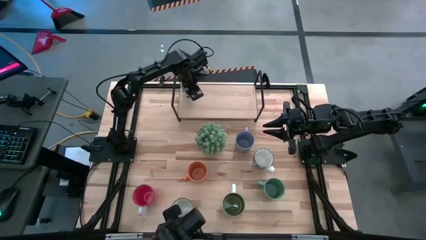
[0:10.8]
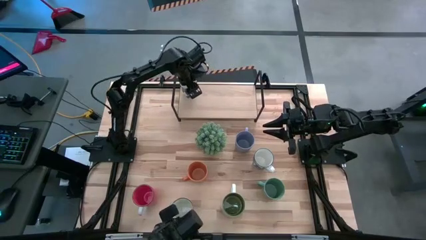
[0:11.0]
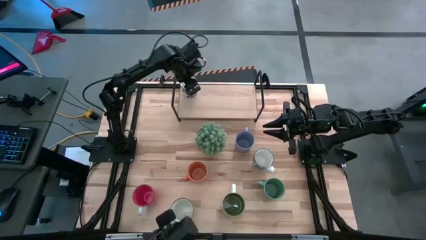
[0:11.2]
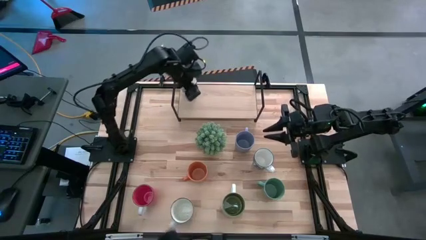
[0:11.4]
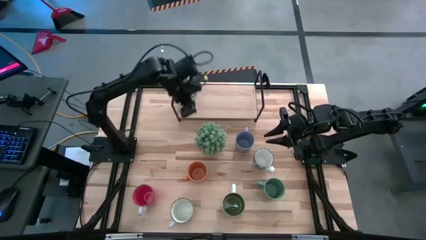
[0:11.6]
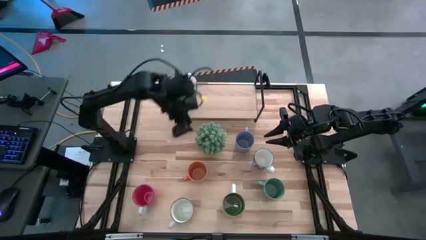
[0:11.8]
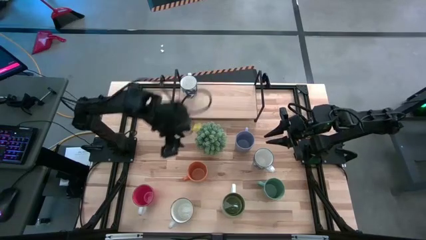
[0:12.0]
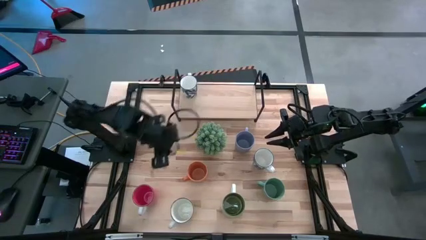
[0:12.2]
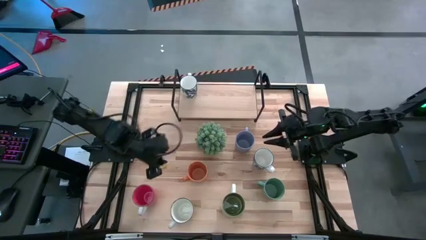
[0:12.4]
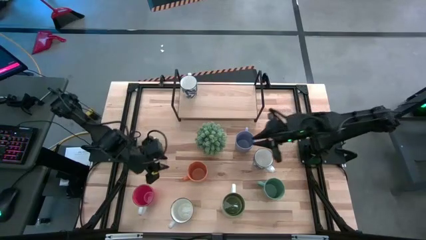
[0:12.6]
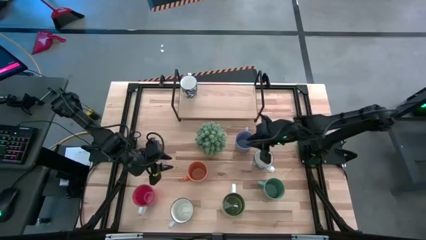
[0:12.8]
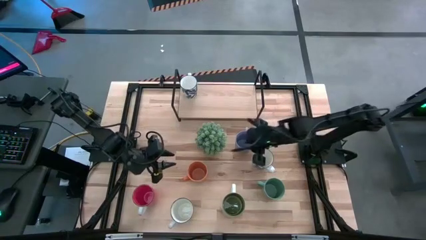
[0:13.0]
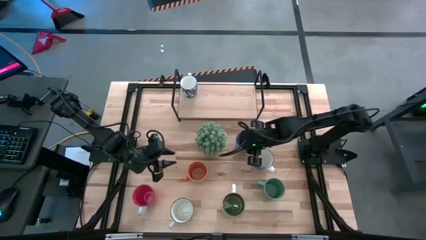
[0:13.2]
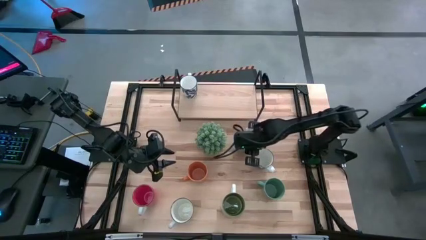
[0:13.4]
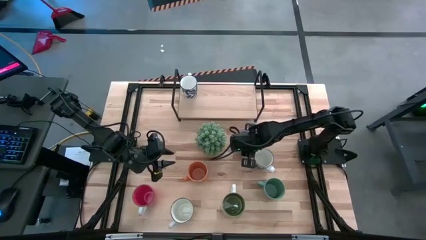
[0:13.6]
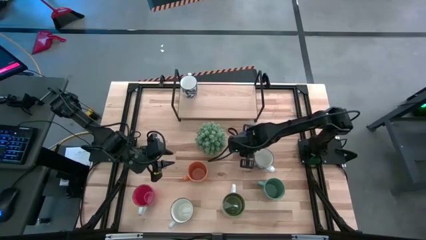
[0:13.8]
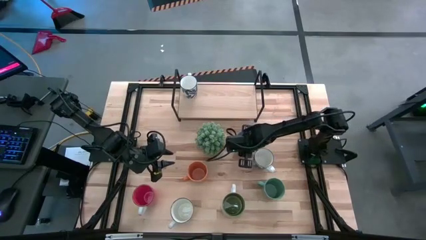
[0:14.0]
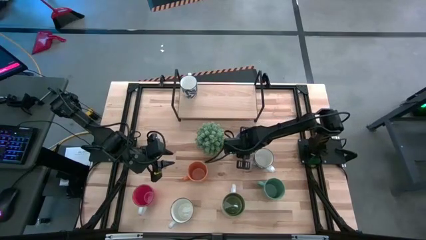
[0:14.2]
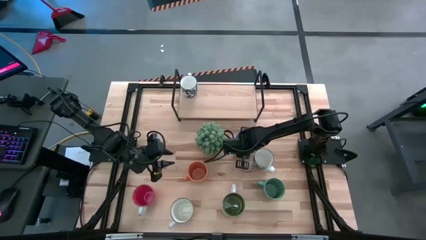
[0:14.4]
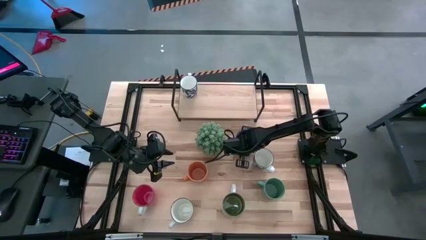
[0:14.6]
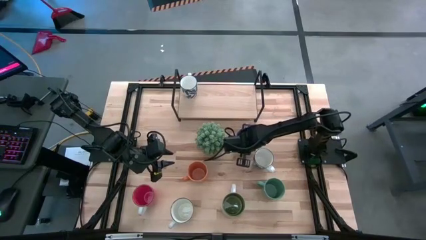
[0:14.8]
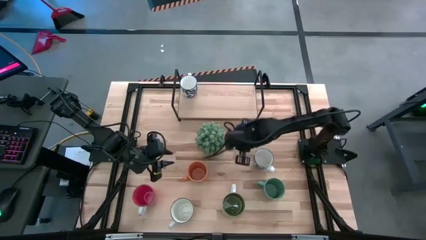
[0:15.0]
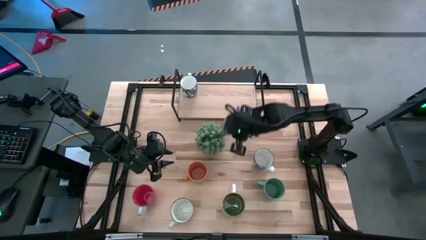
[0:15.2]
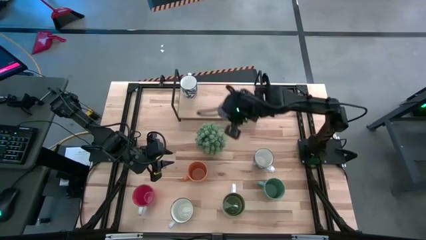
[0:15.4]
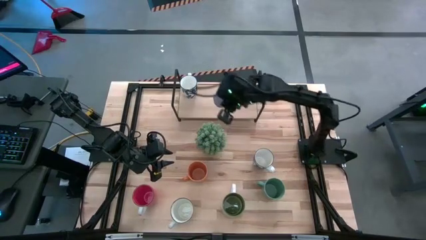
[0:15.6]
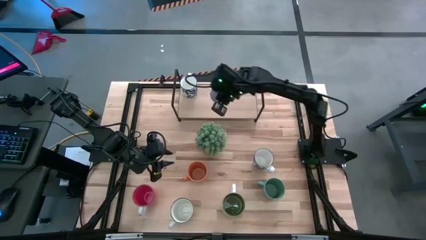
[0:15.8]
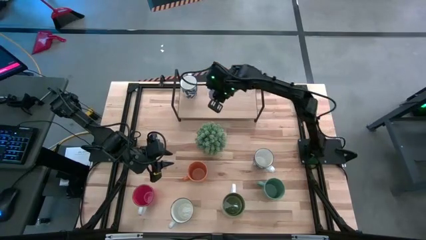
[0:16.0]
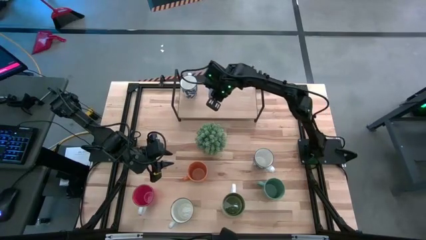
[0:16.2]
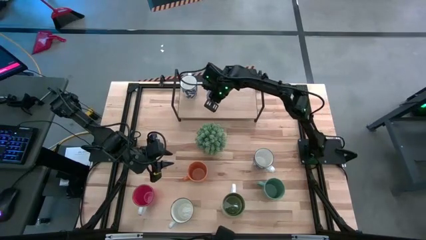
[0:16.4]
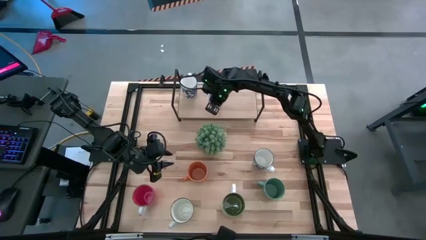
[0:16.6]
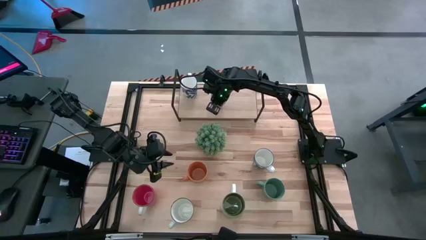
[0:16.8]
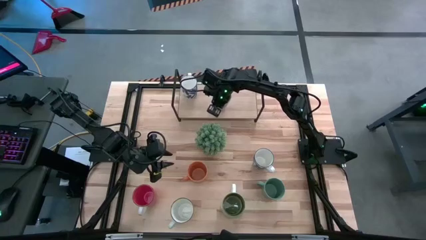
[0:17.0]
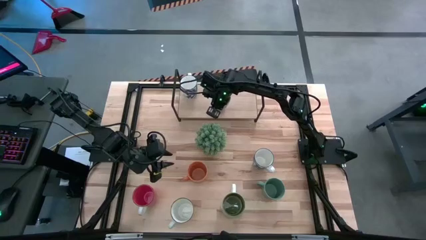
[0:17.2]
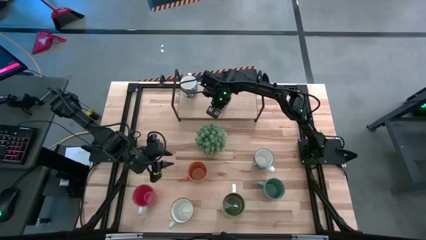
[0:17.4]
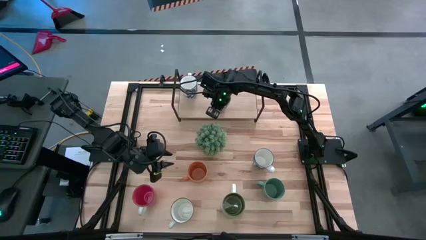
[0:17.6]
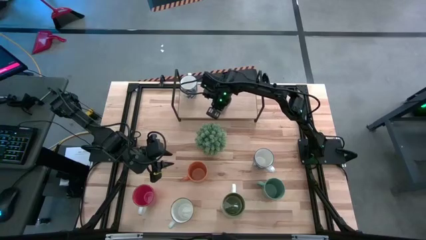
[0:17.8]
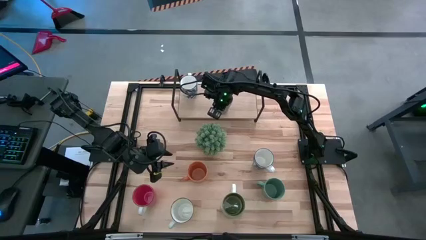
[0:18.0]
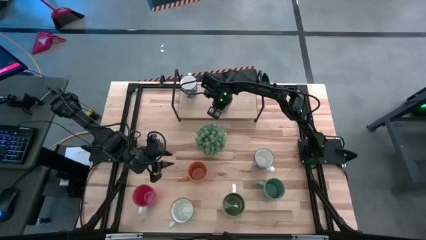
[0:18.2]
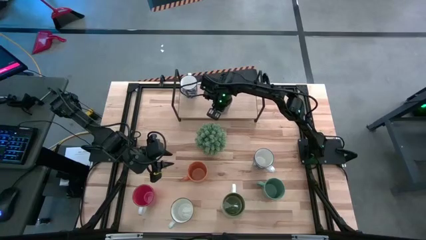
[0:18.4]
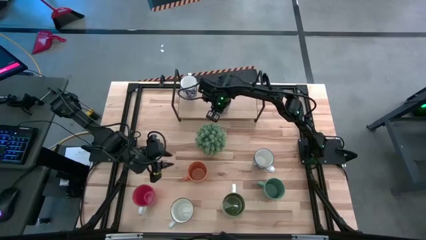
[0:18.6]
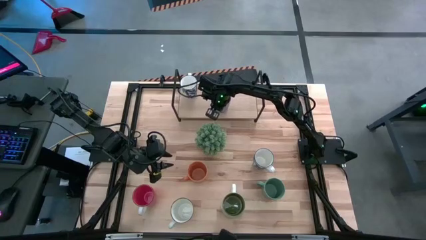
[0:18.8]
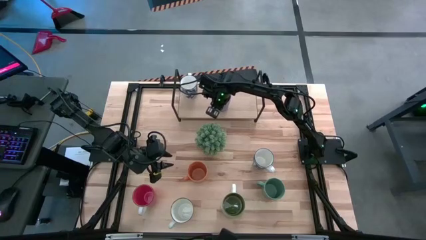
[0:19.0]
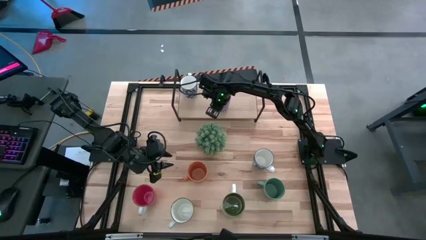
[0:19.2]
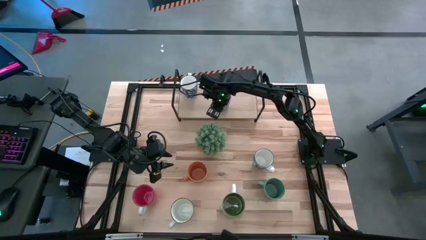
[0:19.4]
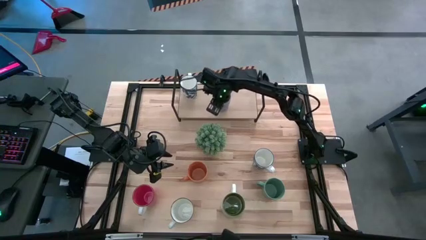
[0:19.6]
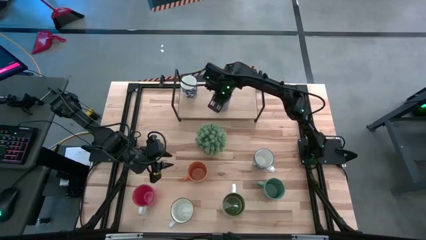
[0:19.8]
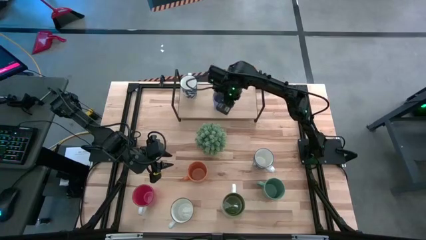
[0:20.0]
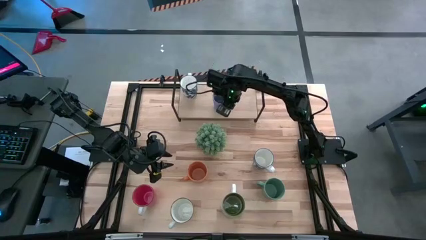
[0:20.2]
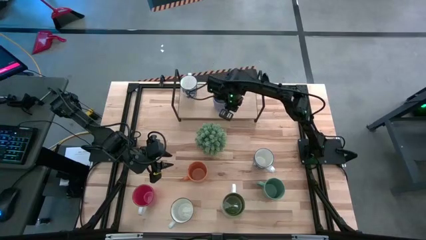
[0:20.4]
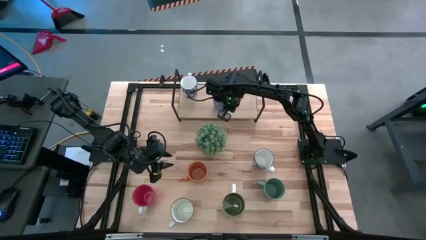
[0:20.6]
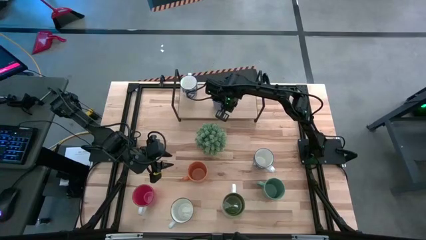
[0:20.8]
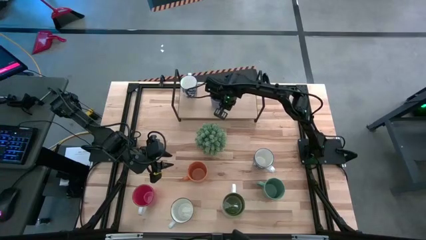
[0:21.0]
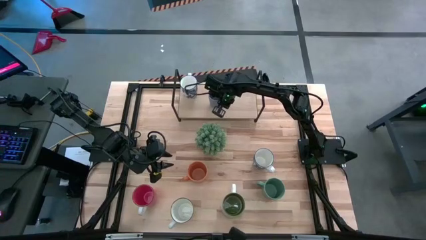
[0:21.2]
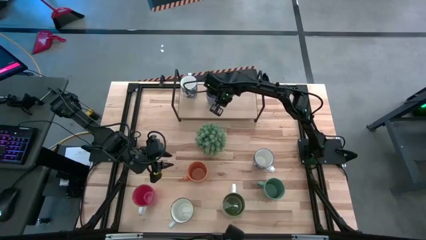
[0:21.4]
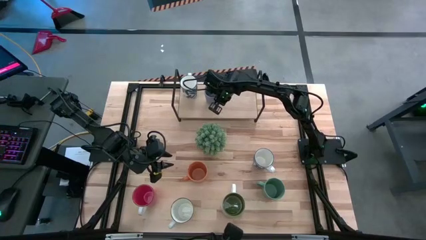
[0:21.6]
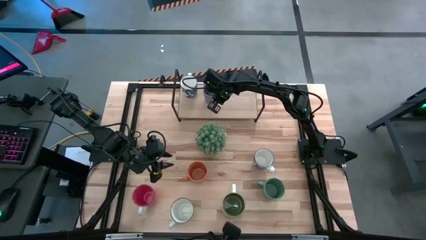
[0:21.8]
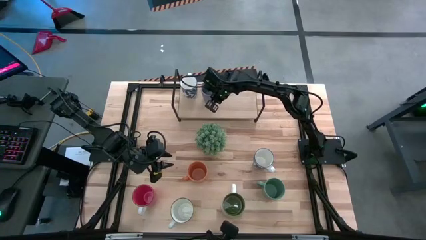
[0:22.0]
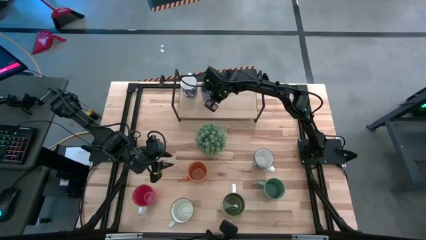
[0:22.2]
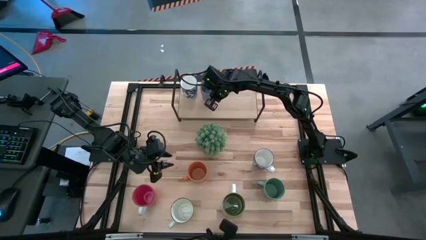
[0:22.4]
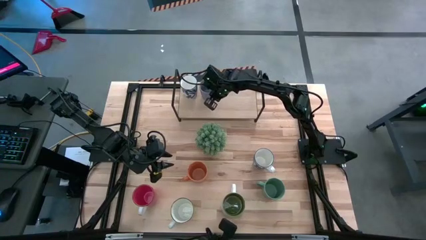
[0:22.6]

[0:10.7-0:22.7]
Task: Place coffee mugs
Put the blue mug on the shelf
